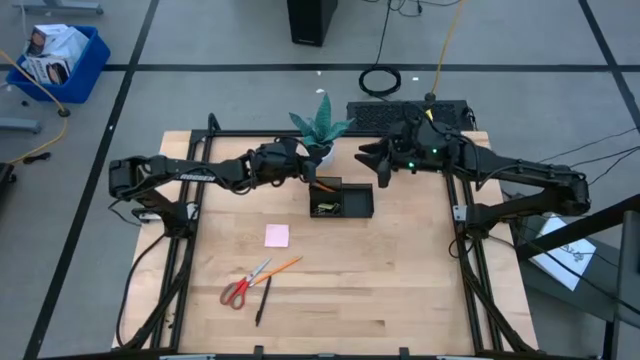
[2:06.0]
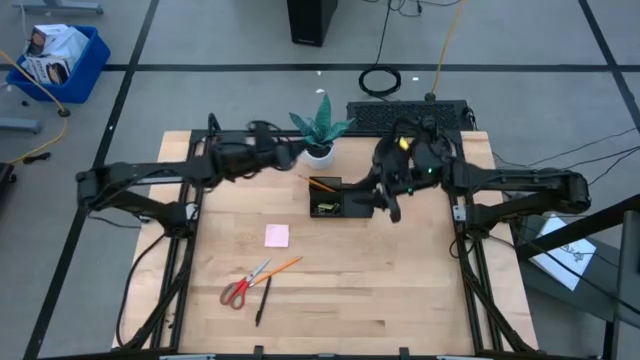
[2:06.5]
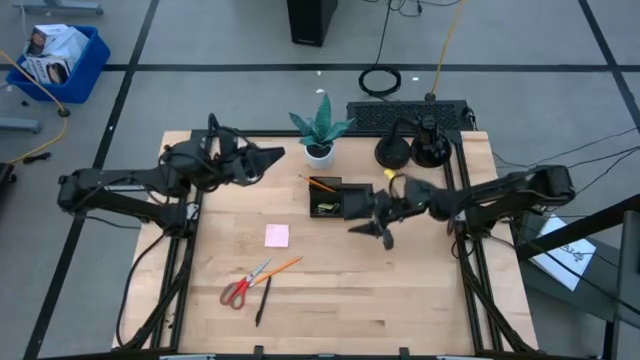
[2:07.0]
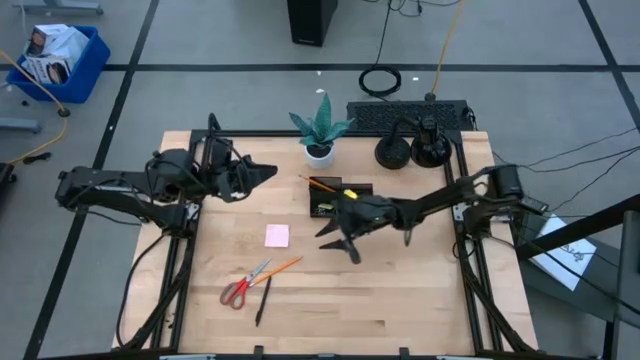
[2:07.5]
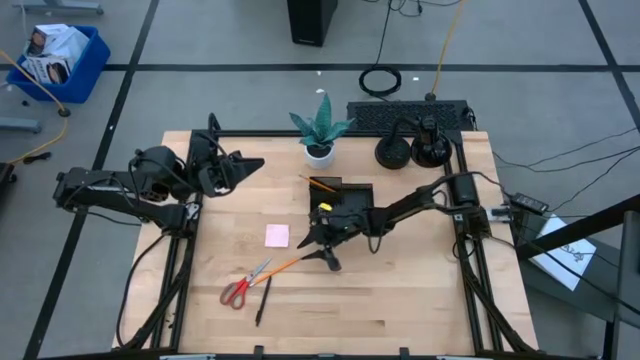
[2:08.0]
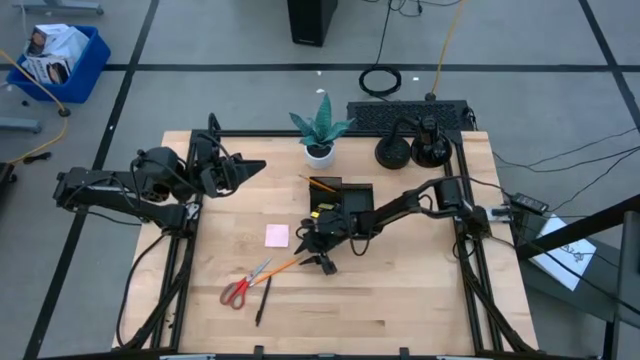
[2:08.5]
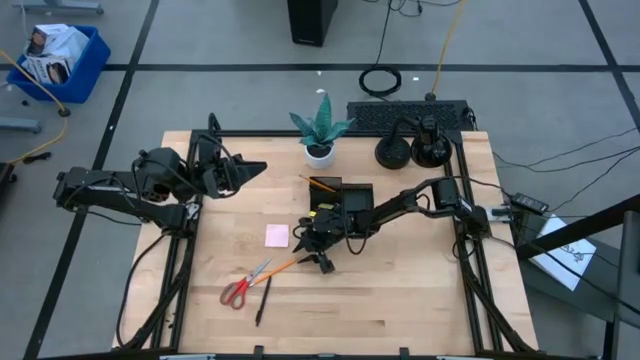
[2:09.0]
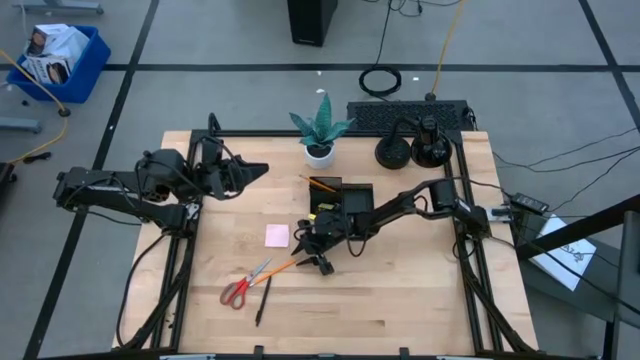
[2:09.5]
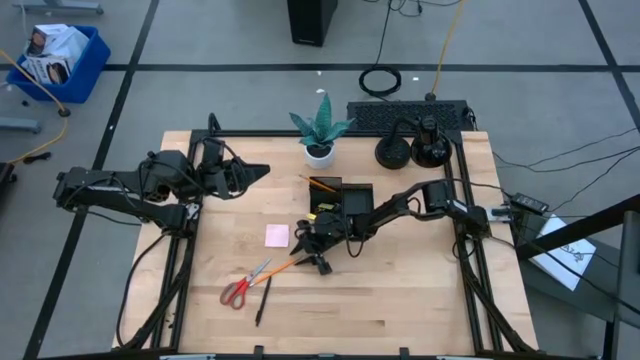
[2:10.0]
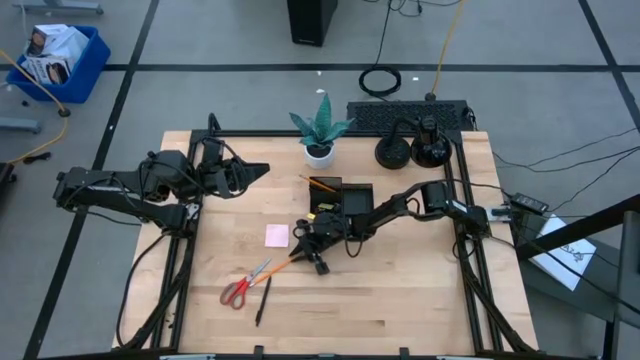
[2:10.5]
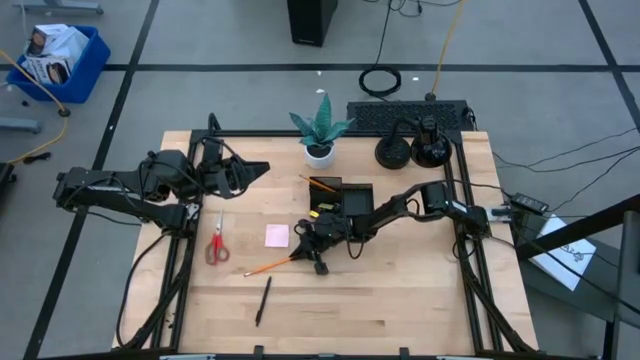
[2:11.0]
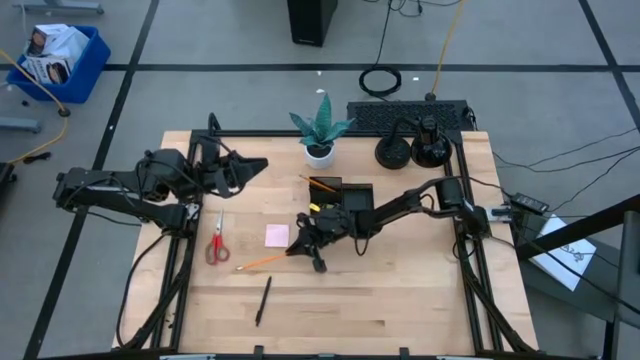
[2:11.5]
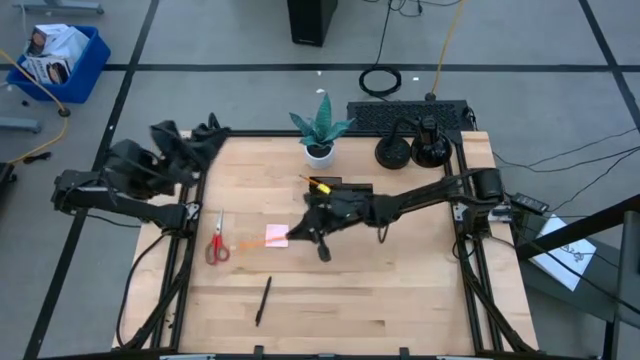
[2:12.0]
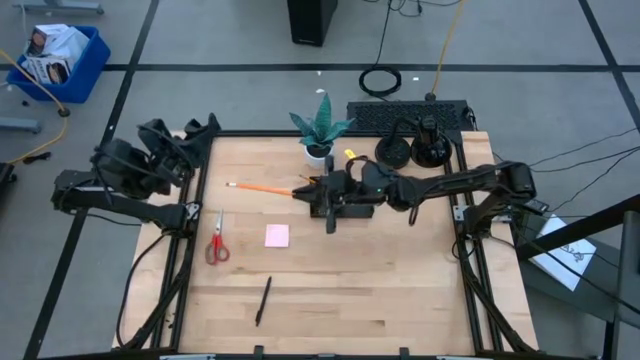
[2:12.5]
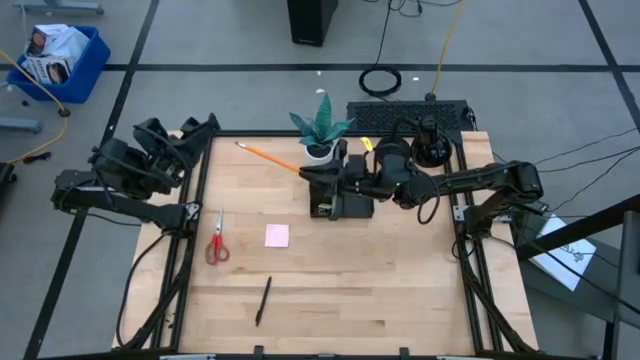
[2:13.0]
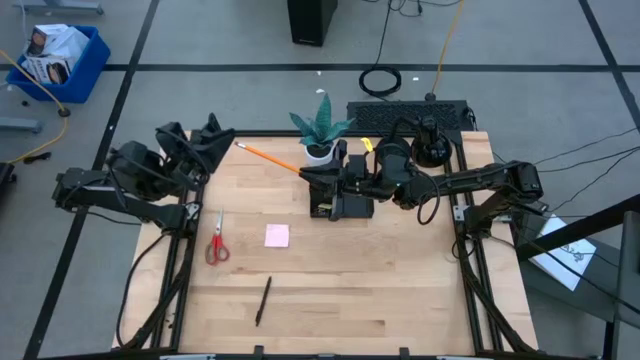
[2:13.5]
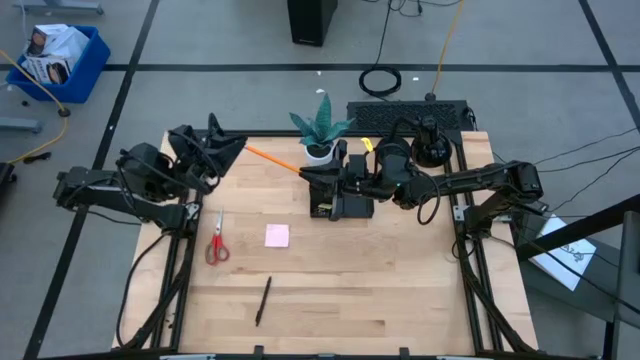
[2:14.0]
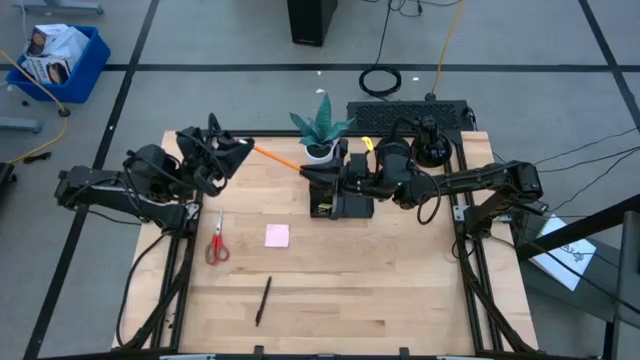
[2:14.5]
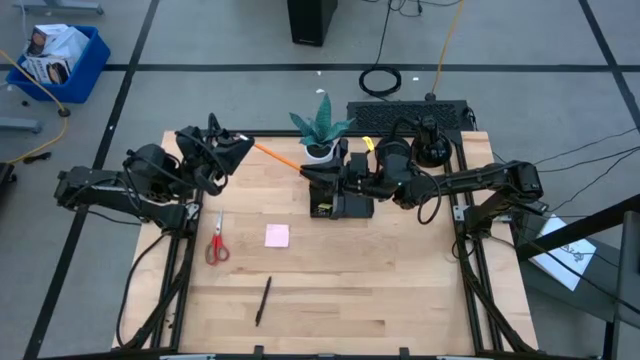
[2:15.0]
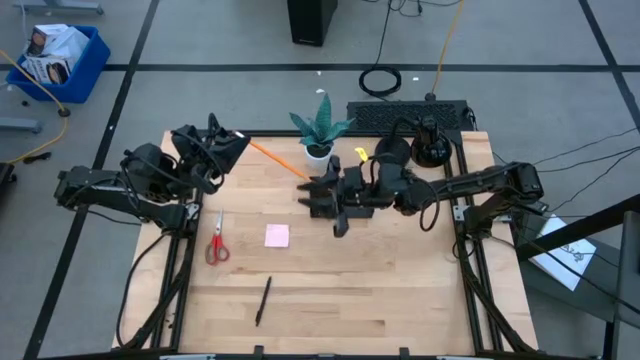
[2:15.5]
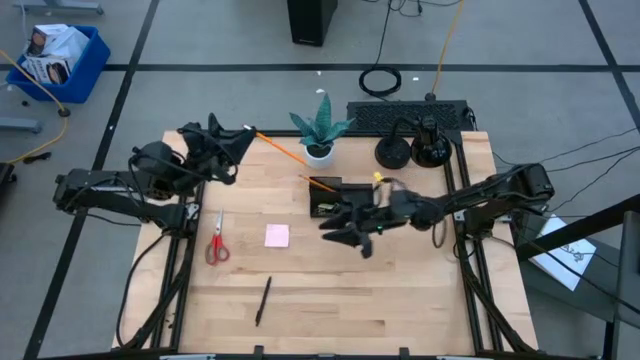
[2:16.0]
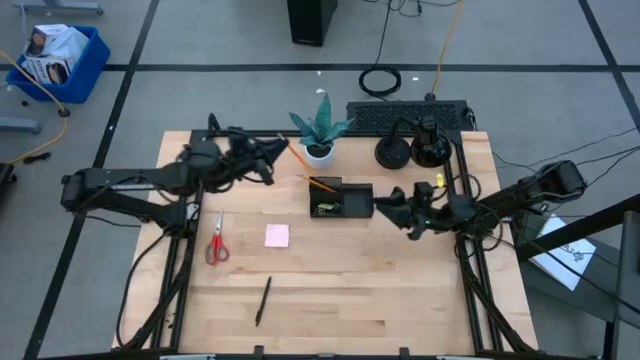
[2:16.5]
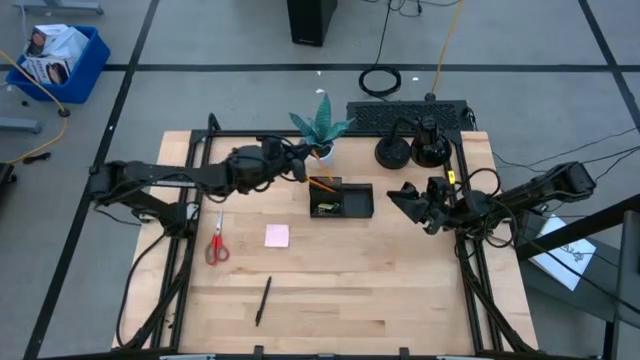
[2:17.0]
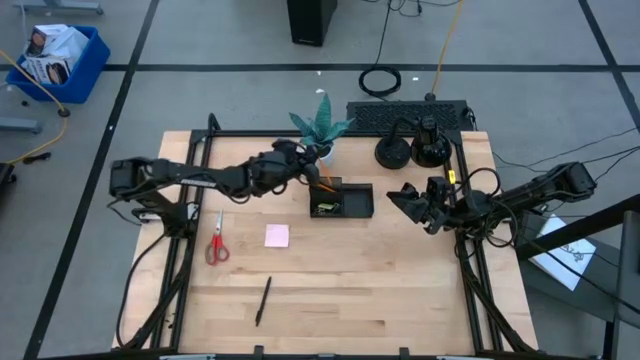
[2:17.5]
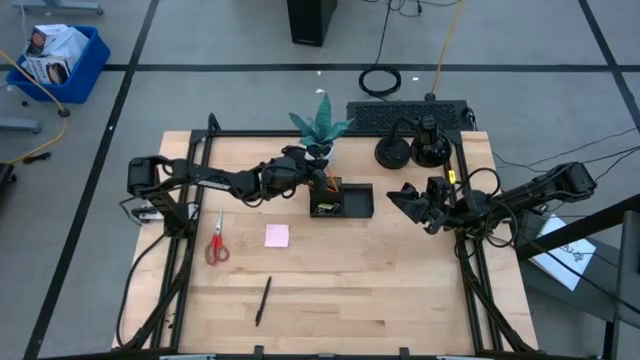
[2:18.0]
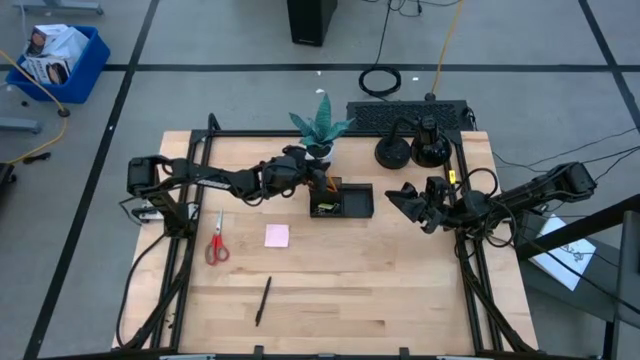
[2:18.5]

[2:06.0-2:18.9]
Task: Pick and place office supplies into organizer
Put the orange pencil into the black desk organizer

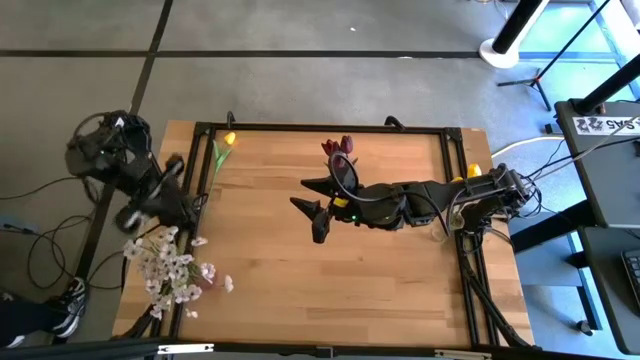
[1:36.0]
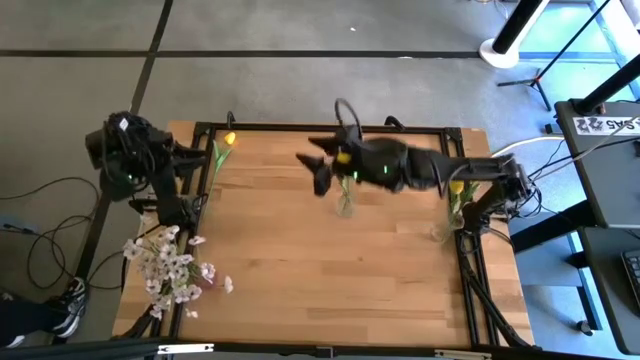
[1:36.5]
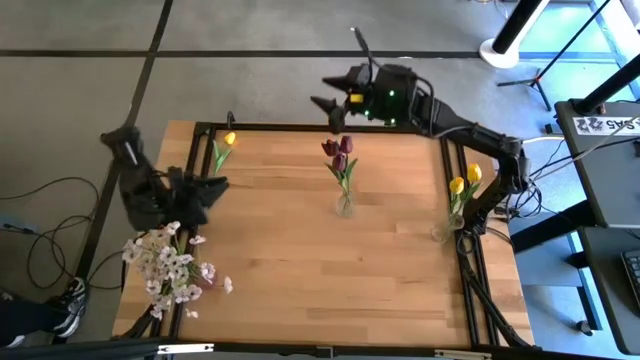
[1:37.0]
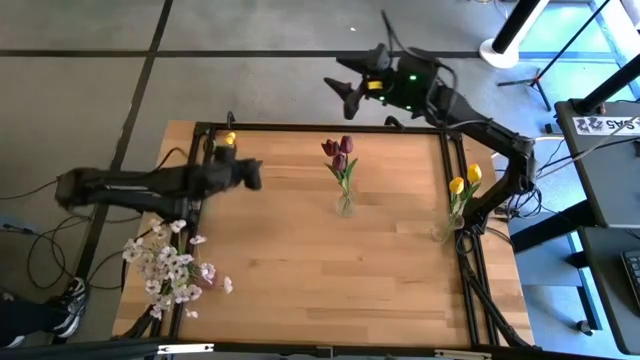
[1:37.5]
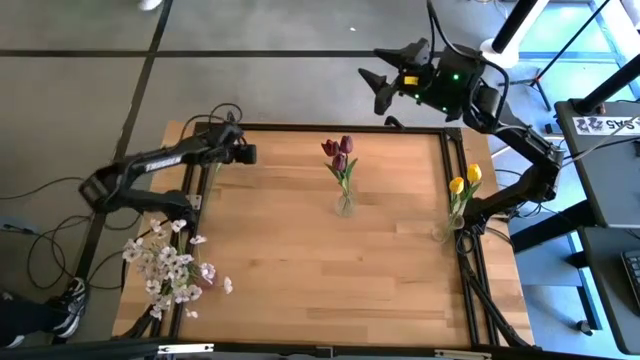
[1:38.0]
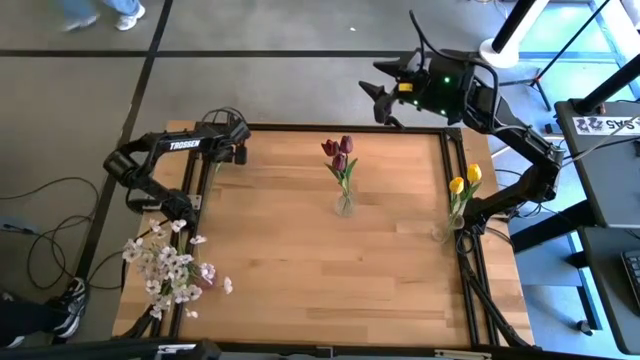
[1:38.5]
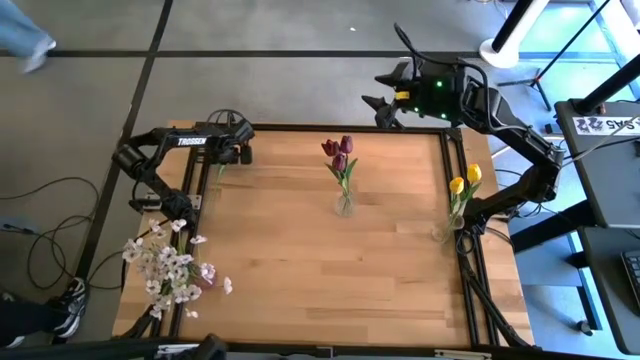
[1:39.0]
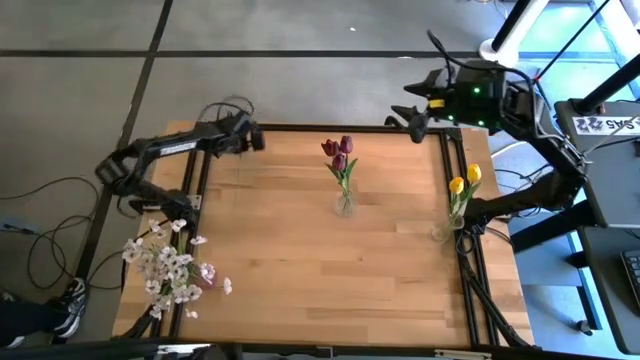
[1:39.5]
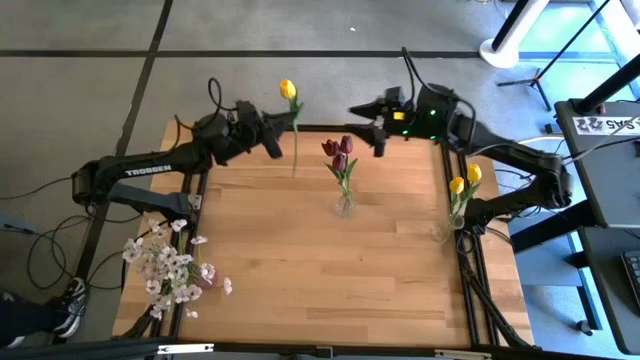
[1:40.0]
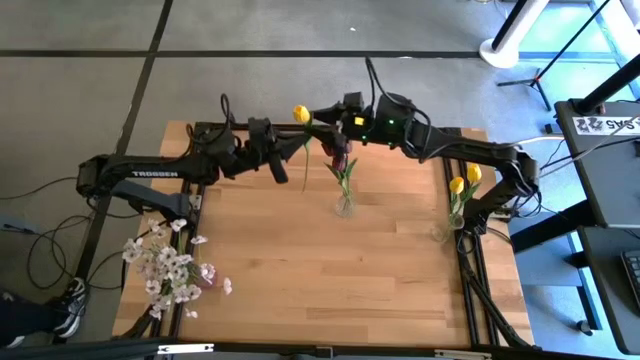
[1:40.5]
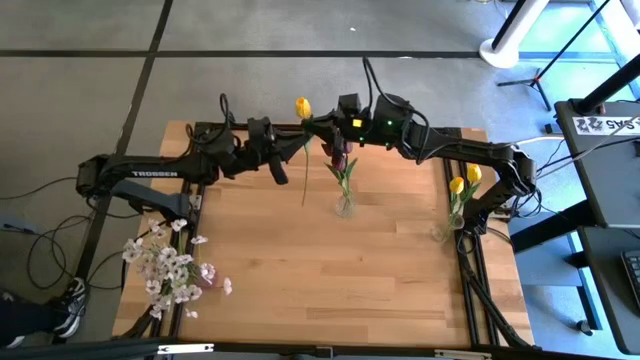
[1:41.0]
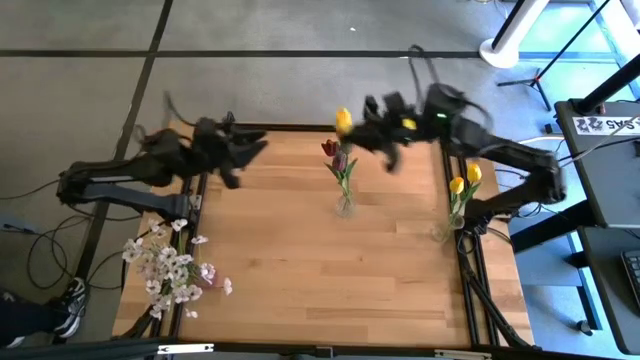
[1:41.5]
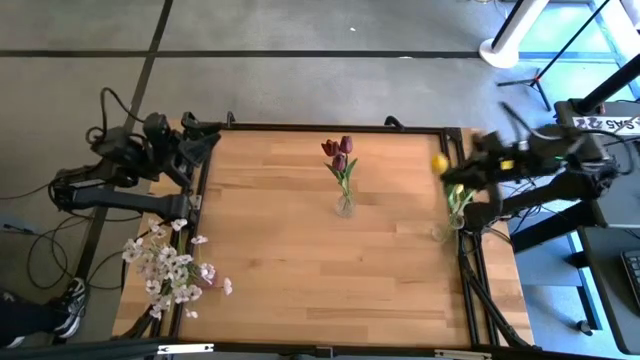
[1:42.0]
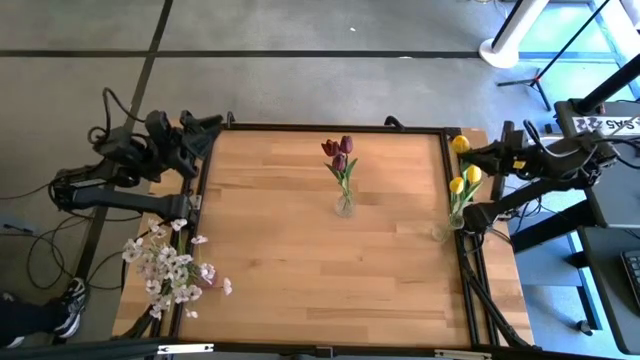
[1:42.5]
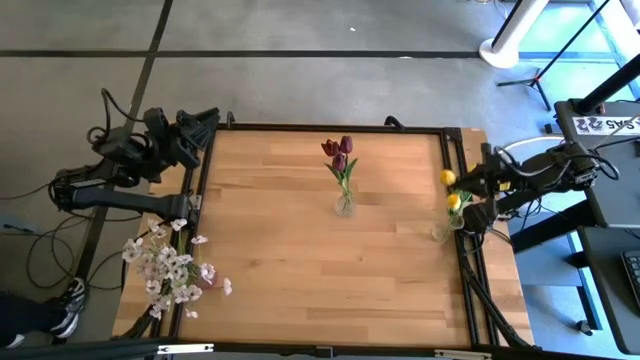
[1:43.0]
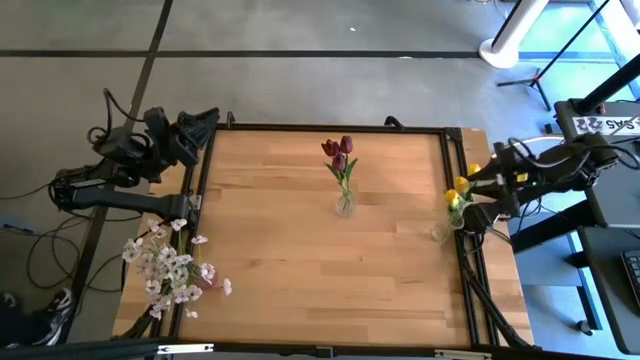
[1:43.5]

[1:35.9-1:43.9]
Task: Sort flowers into vase by color
Put the yellow tulip into the bottom transparent vase
